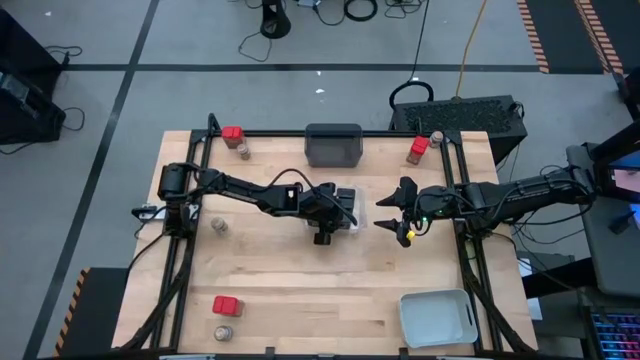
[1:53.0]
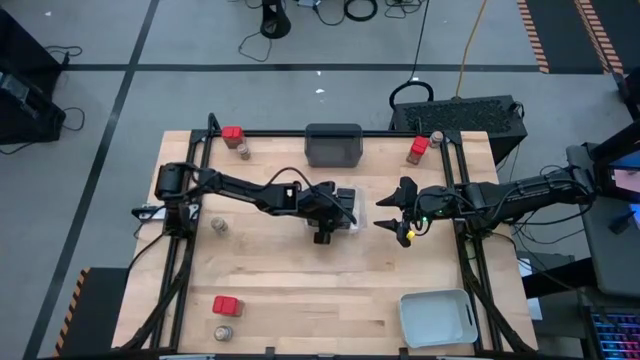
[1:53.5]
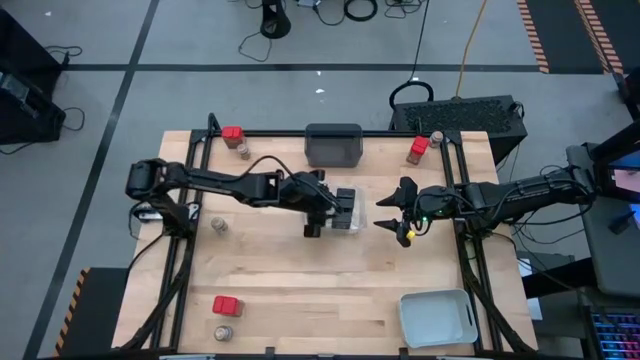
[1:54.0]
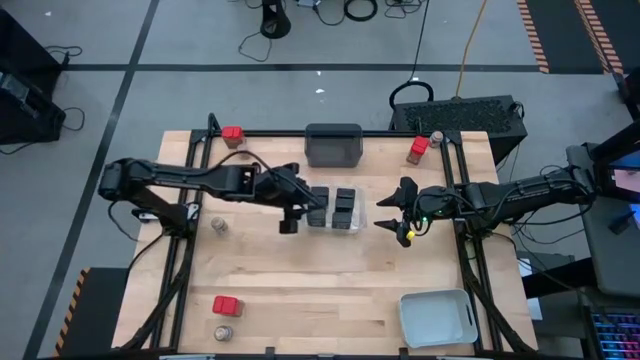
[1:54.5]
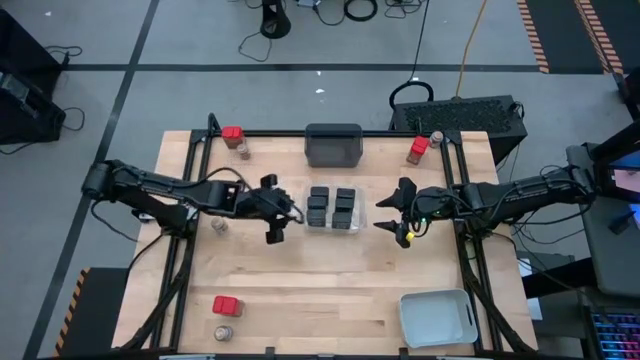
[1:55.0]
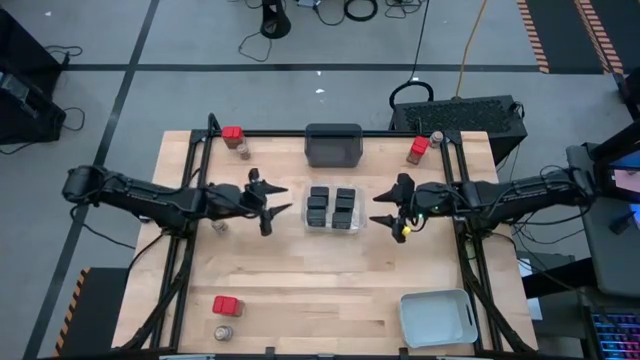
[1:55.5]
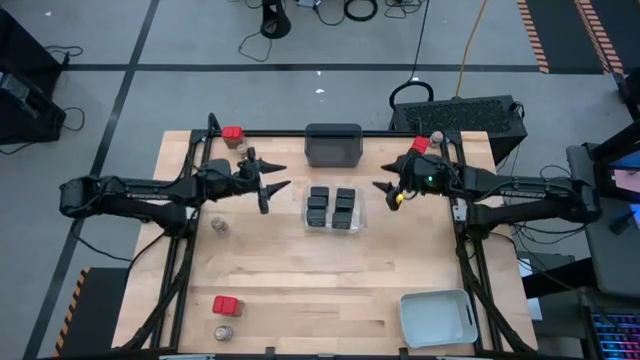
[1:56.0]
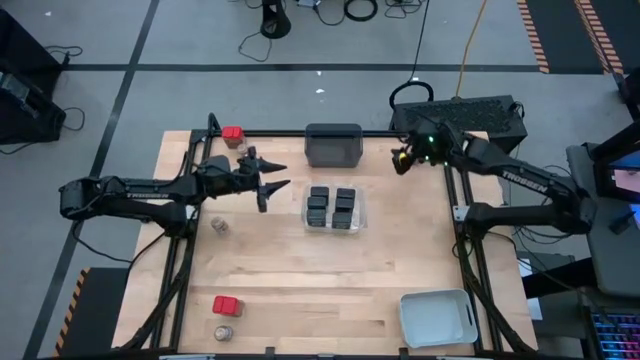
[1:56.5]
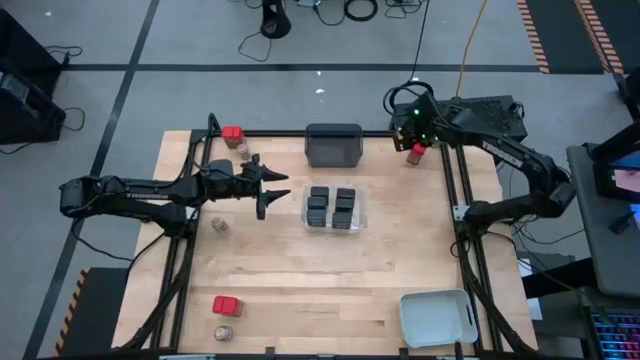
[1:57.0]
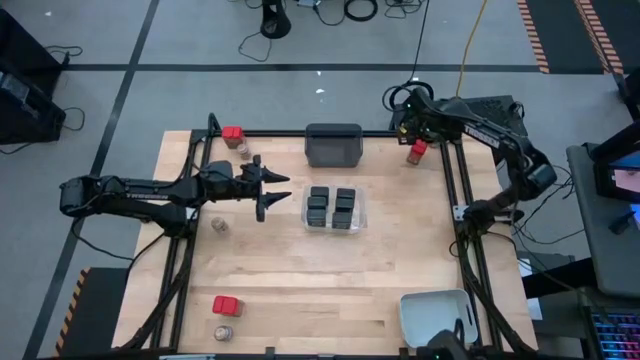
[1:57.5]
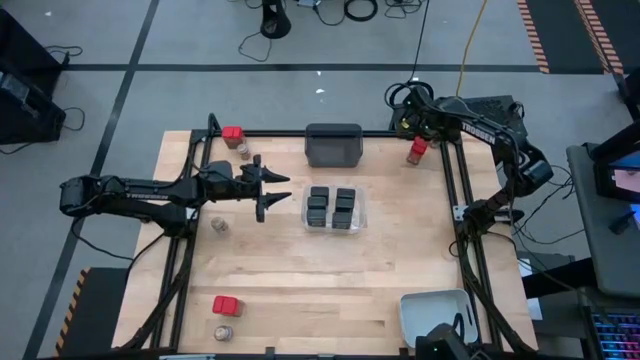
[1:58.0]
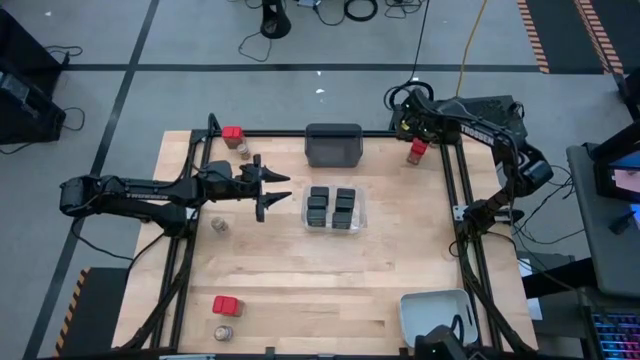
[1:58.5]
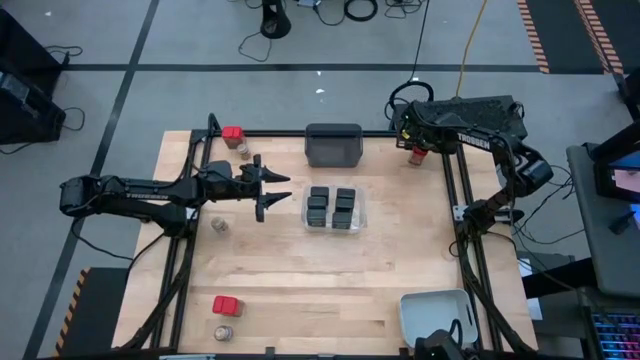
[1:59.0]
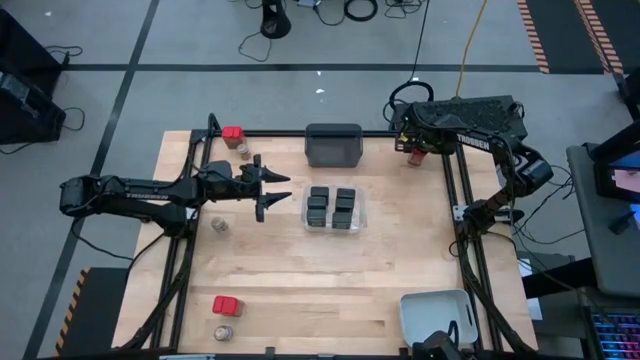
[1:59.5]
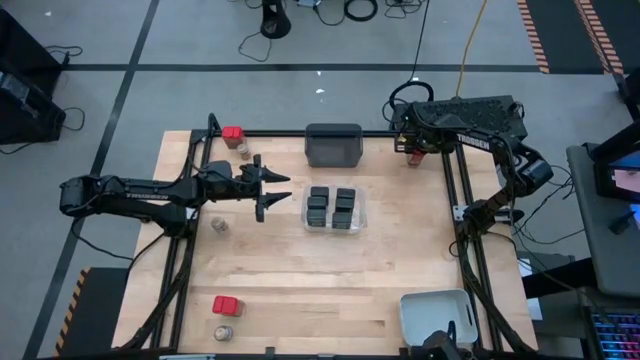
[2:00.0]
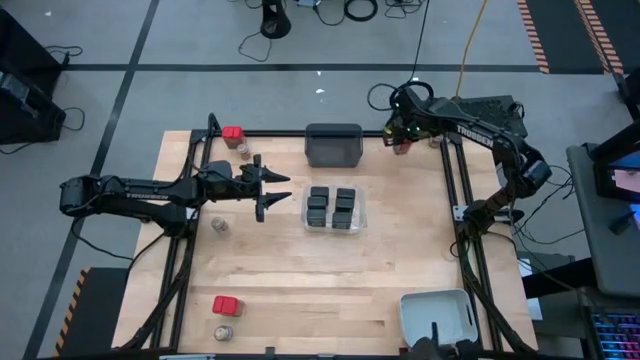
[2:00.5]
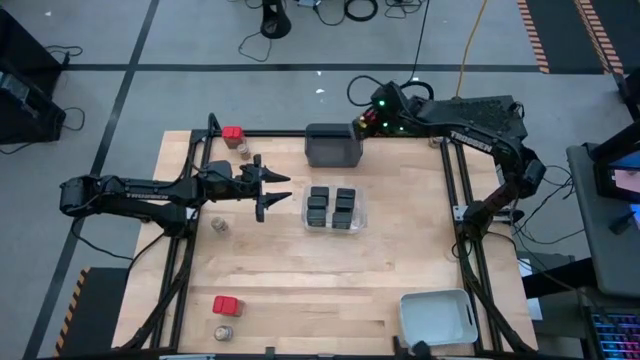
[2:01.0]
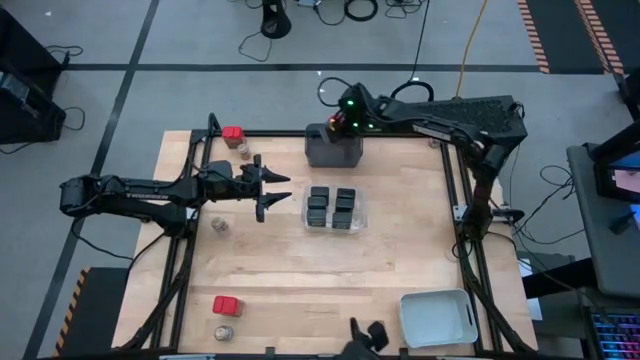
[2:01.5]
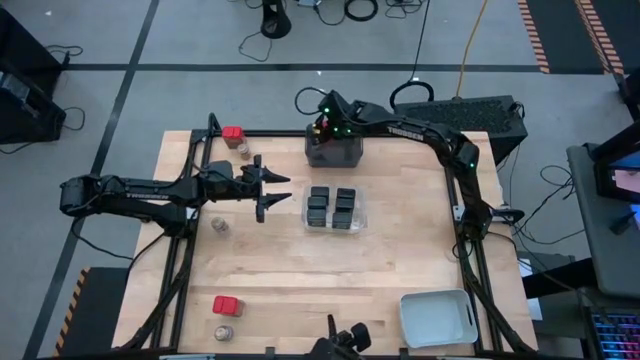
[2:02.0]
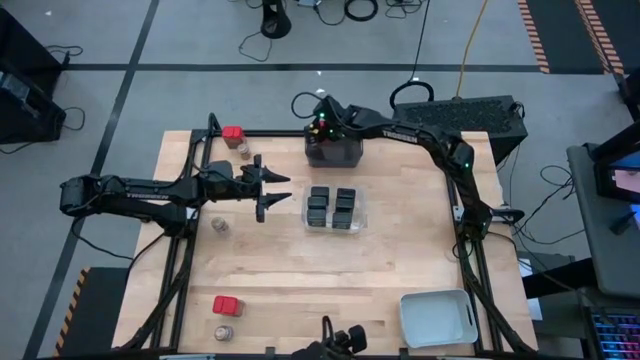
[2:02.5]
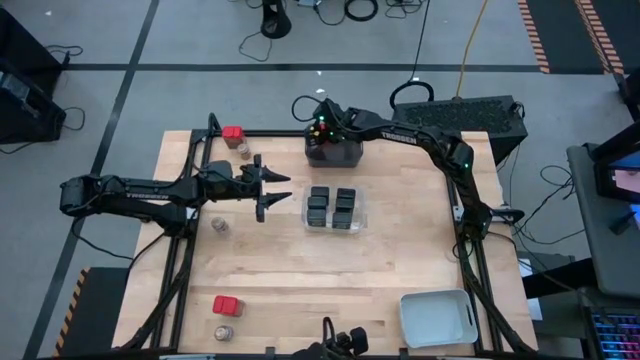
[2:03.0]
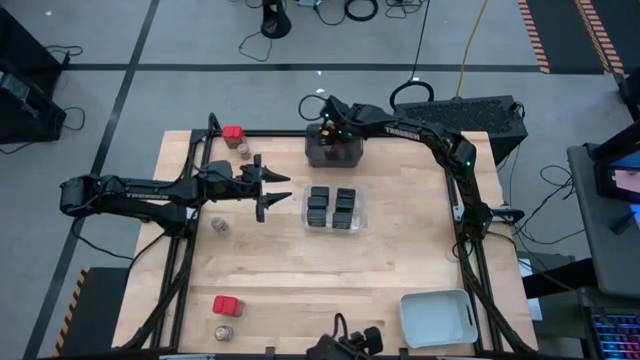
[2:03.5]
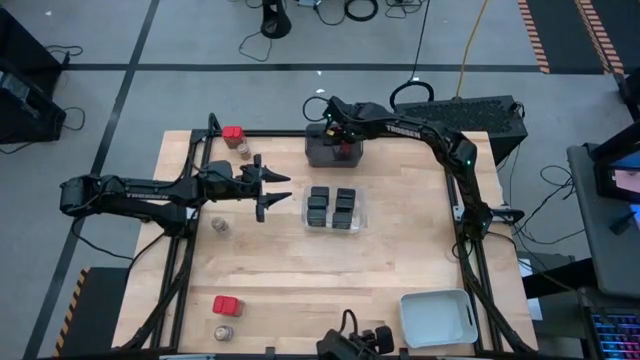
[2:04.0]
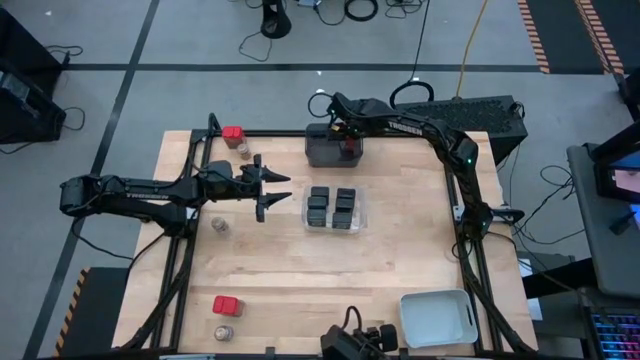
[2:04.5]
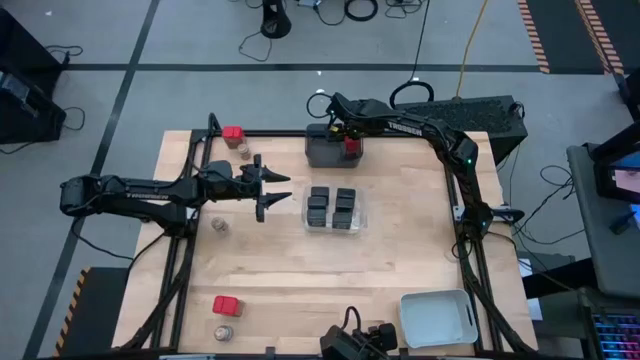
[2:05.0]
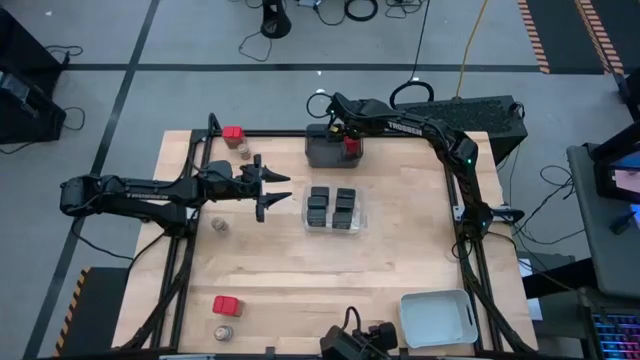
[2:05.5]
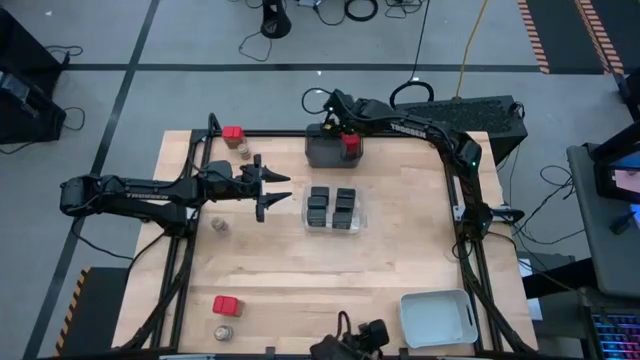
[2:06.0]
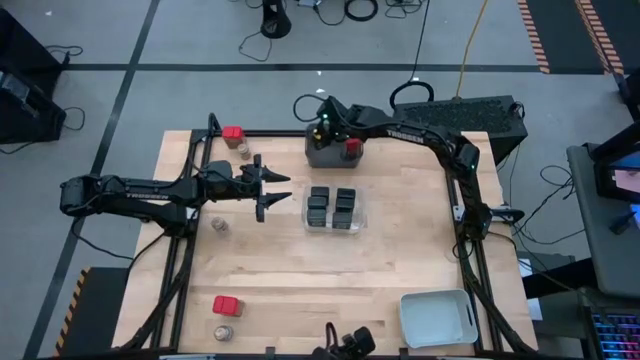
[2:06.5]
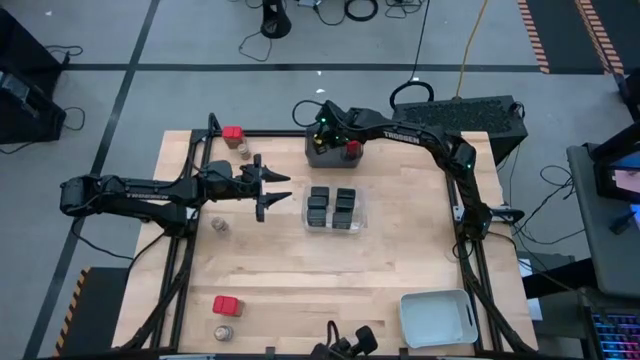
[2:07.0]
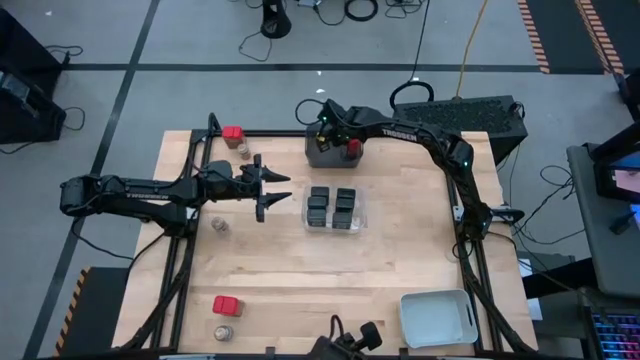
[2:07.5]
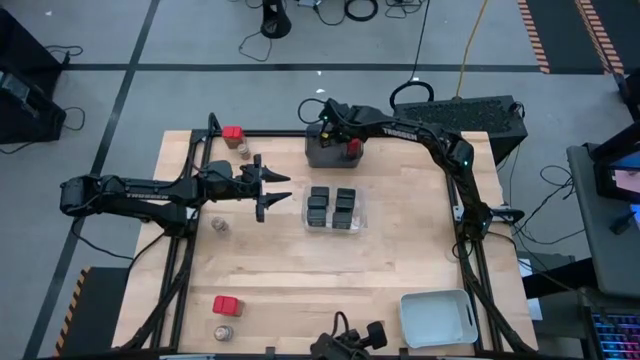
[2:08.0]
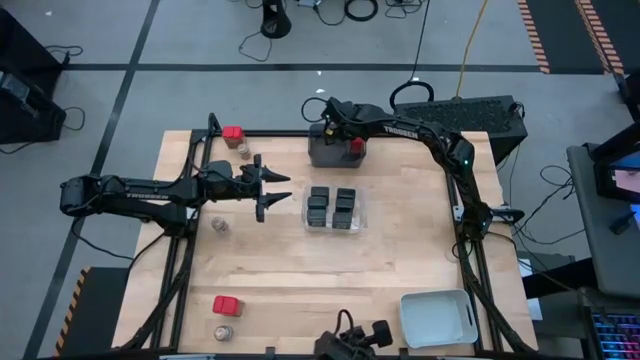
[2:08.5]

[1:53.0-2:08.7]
Task: Sort spices by type
Put the red seasoning bottle into the gray bin

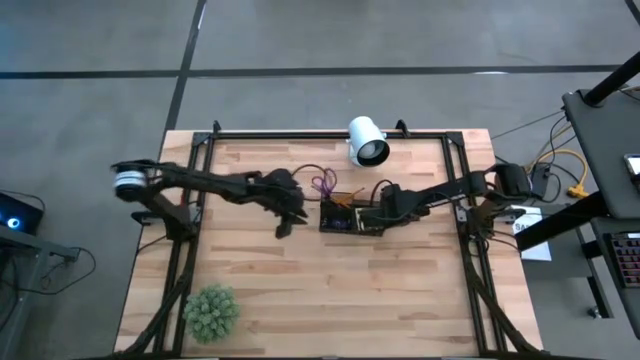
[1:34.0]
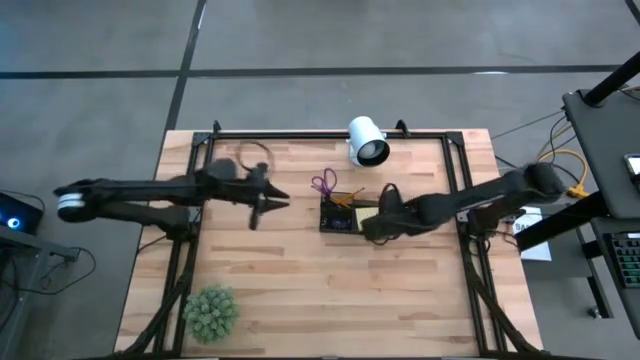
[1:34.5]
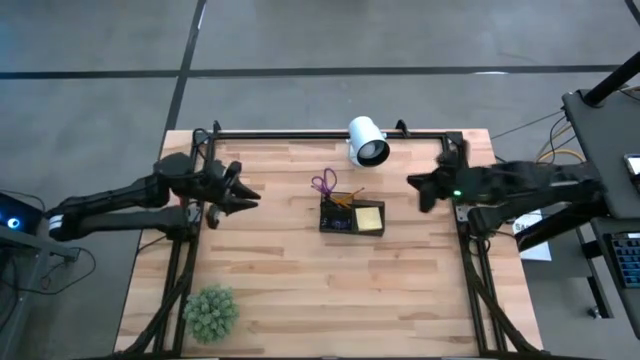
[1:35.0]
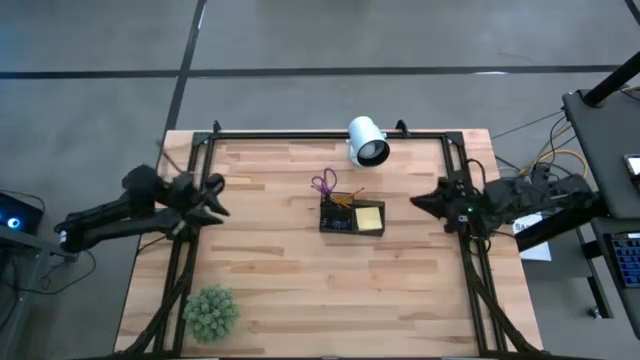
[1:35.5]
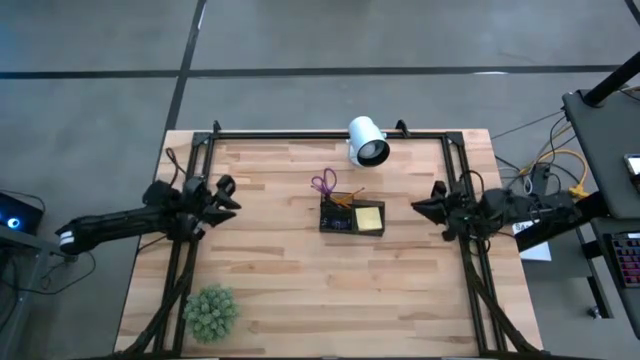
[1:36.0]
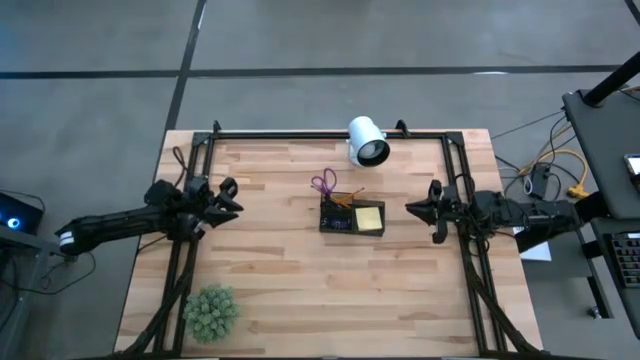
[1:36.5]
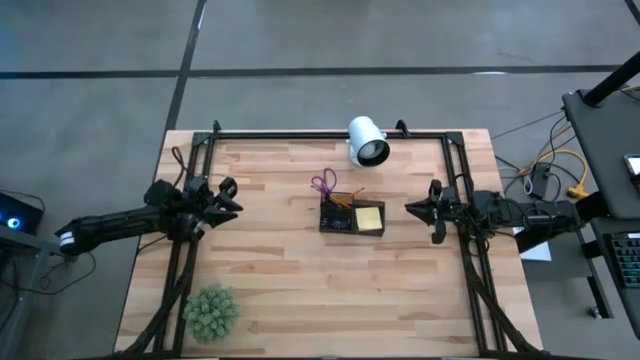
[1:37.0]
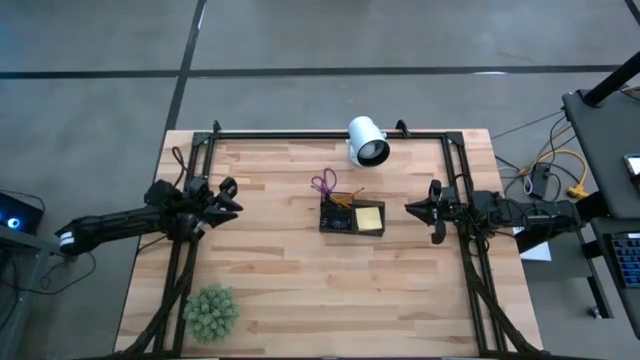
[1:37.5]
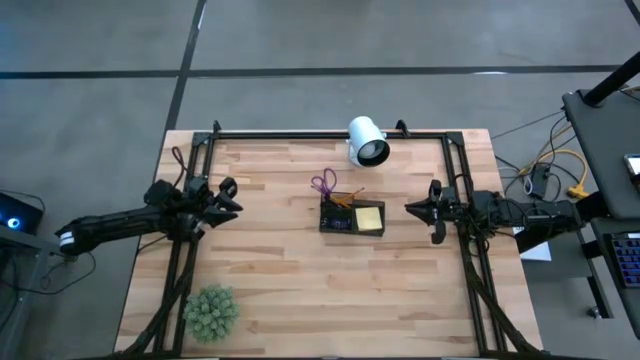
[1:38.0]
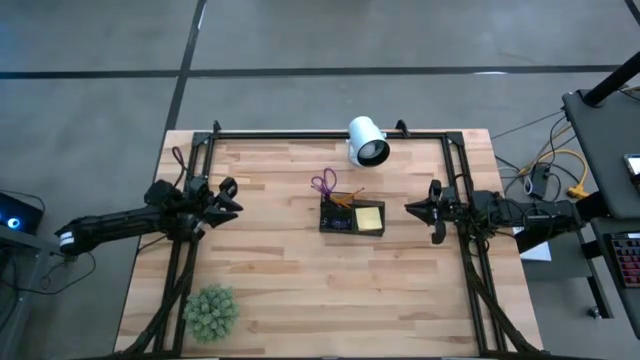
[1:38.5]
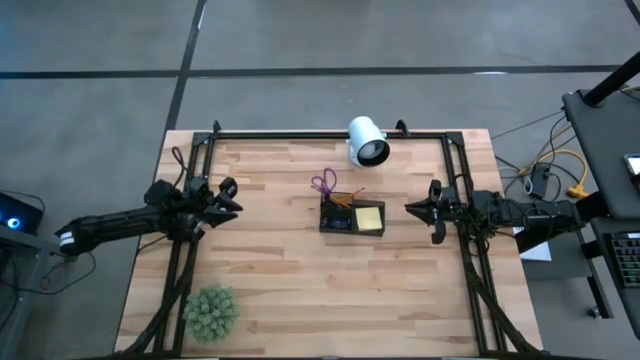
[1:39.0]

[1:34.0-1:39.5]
Task: Pick and place office supplies into organizer
Return to Home Position
